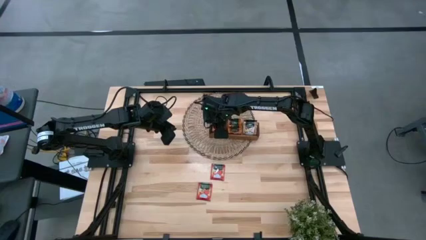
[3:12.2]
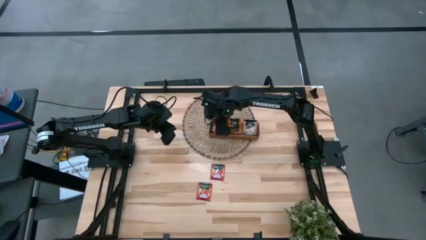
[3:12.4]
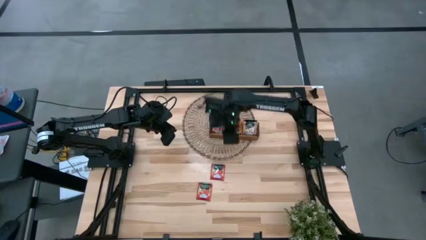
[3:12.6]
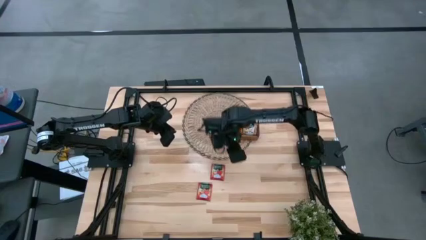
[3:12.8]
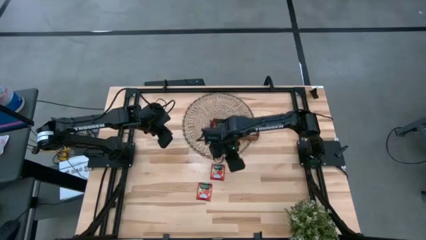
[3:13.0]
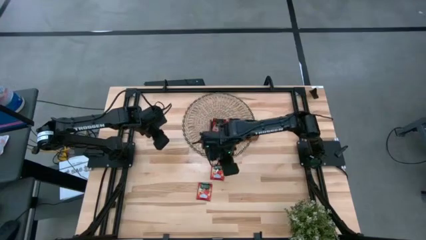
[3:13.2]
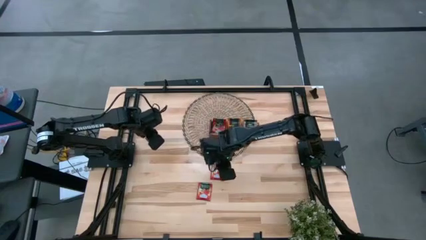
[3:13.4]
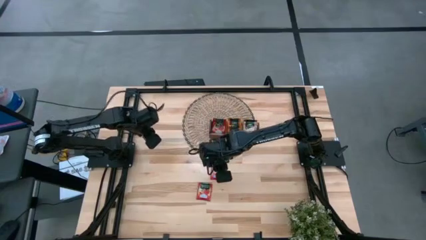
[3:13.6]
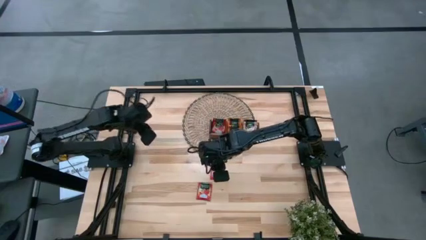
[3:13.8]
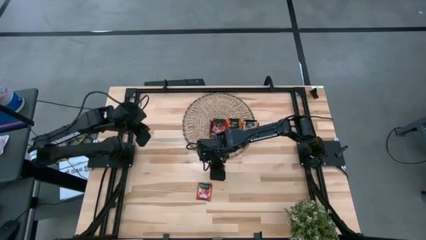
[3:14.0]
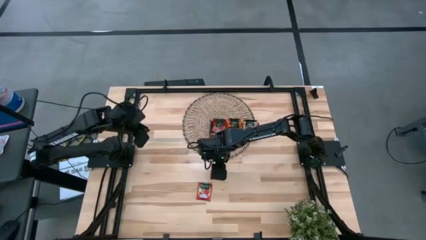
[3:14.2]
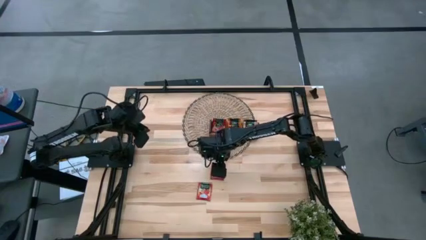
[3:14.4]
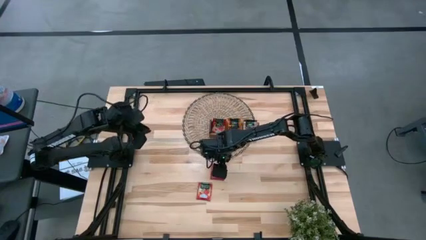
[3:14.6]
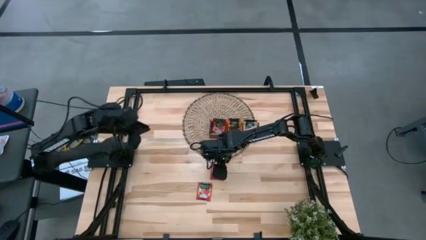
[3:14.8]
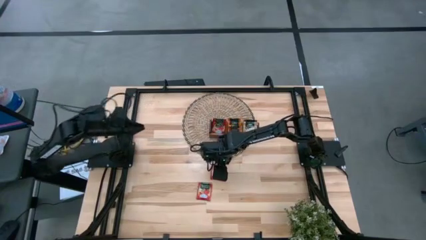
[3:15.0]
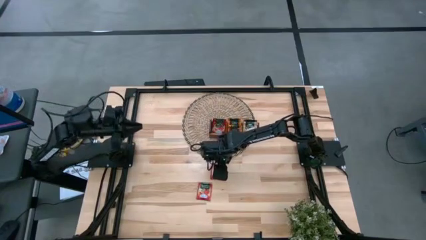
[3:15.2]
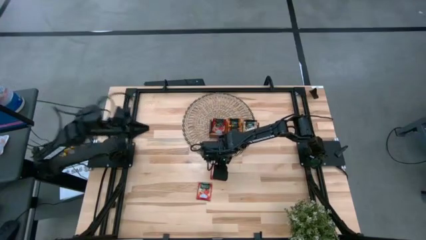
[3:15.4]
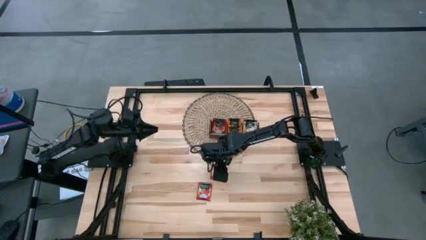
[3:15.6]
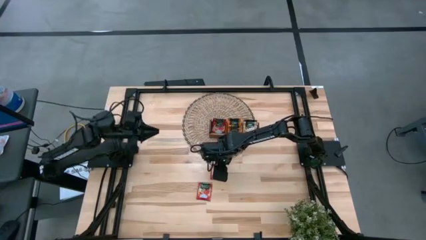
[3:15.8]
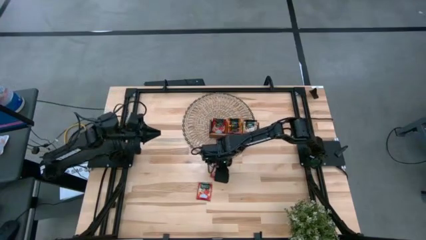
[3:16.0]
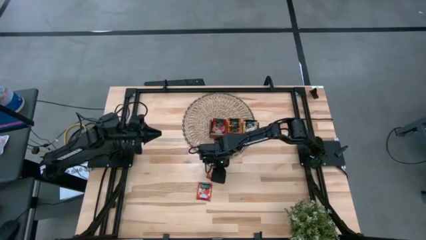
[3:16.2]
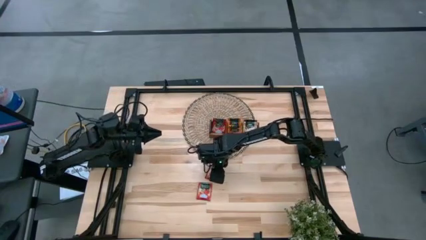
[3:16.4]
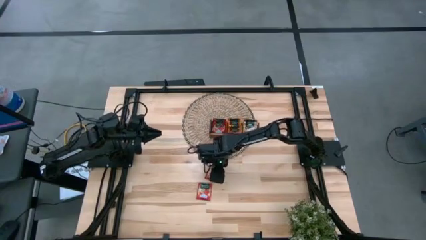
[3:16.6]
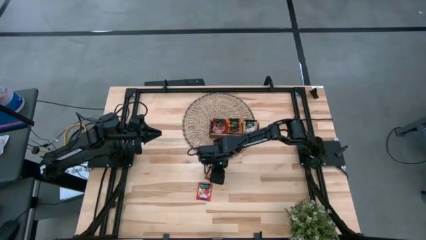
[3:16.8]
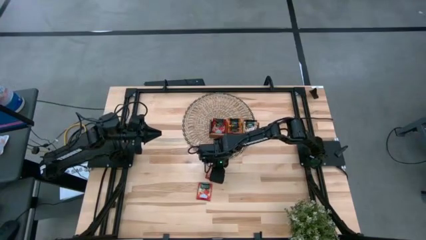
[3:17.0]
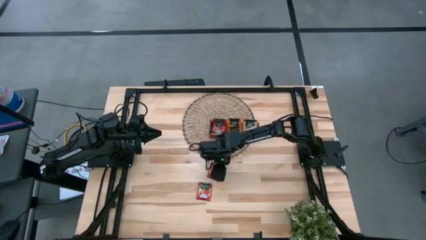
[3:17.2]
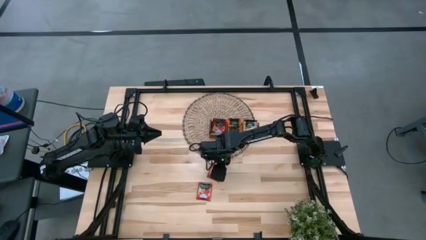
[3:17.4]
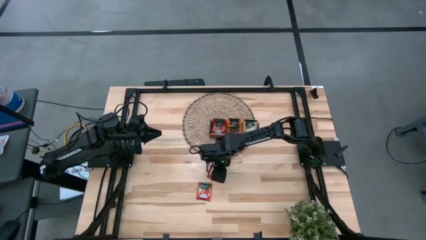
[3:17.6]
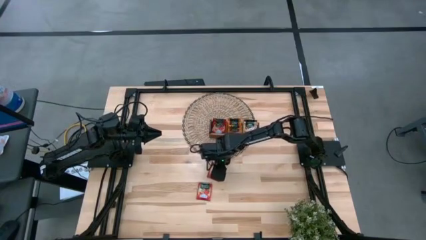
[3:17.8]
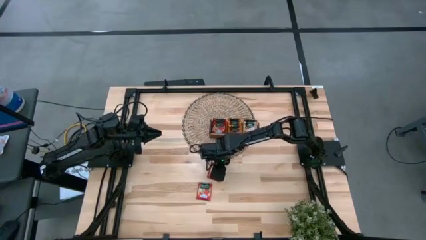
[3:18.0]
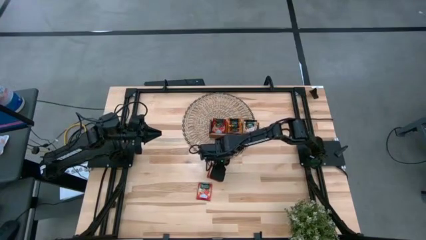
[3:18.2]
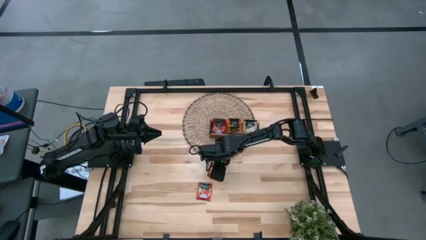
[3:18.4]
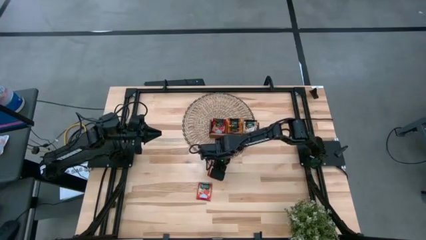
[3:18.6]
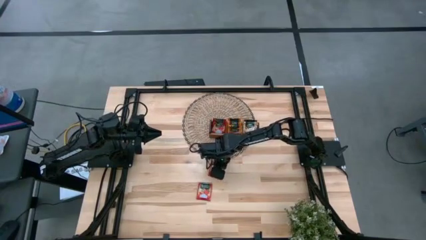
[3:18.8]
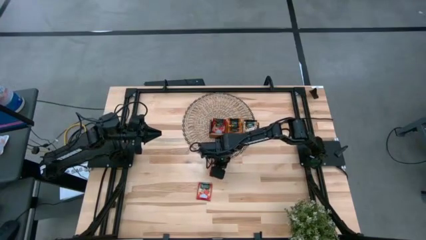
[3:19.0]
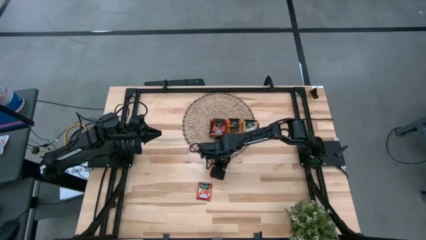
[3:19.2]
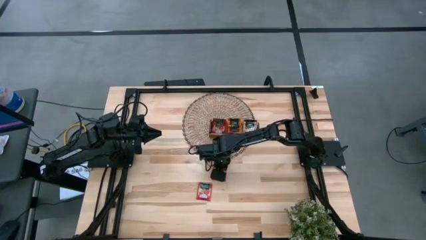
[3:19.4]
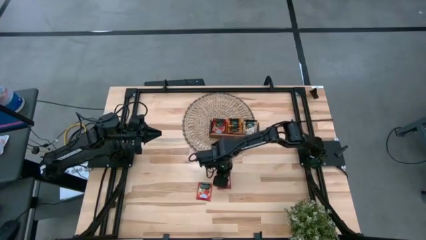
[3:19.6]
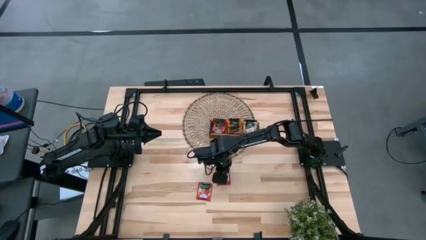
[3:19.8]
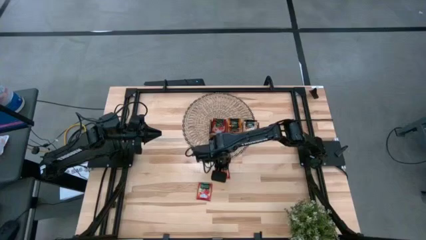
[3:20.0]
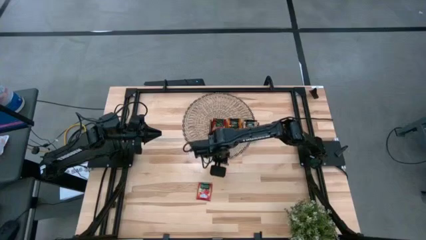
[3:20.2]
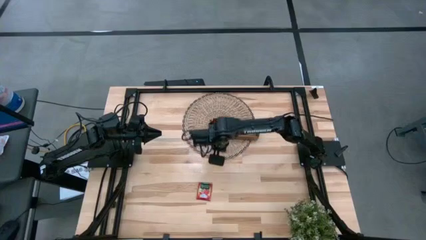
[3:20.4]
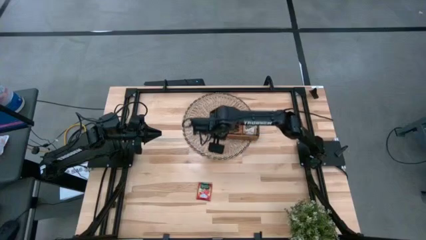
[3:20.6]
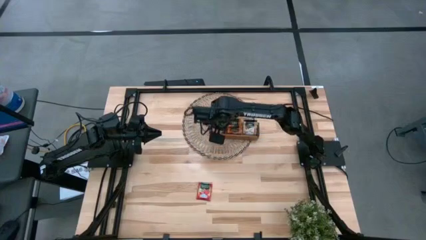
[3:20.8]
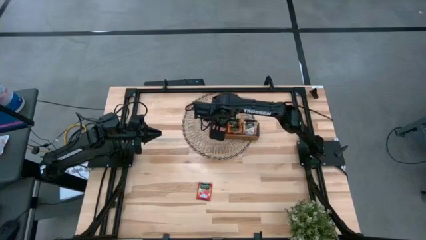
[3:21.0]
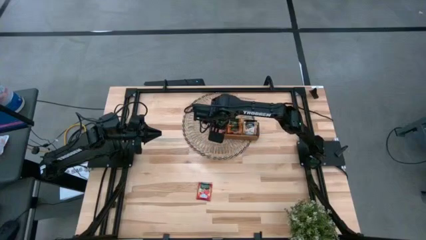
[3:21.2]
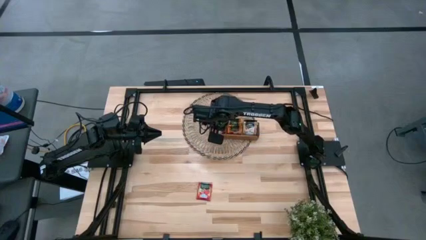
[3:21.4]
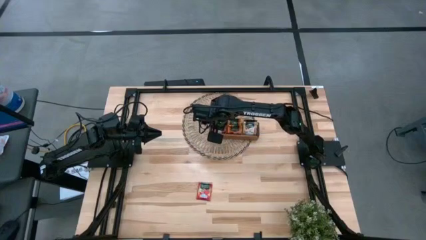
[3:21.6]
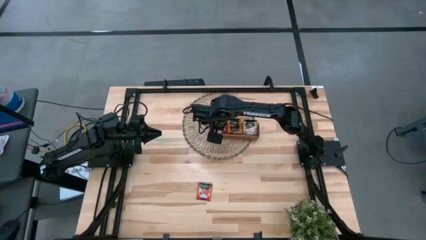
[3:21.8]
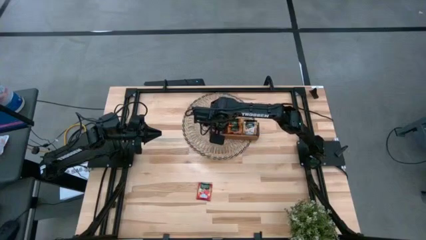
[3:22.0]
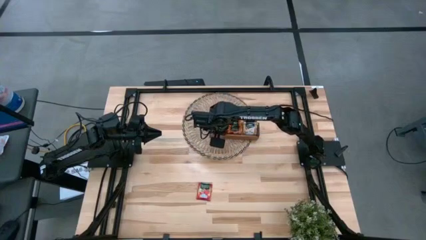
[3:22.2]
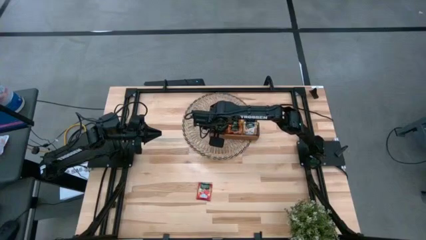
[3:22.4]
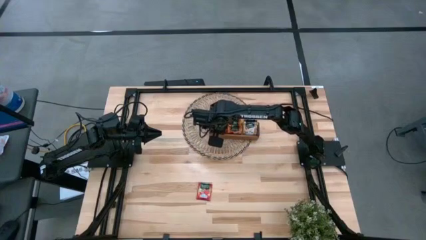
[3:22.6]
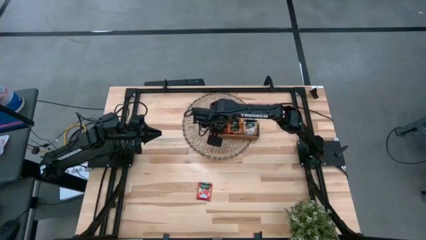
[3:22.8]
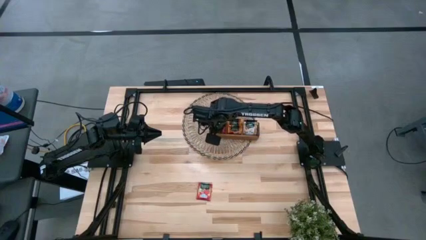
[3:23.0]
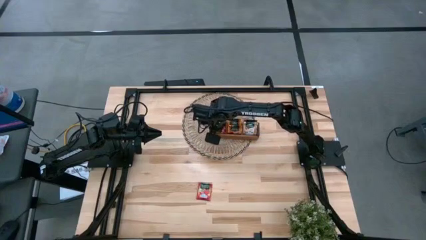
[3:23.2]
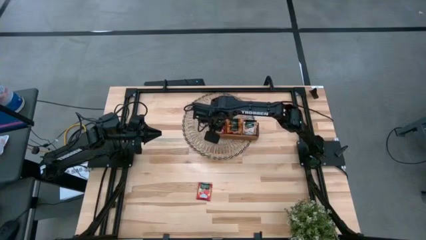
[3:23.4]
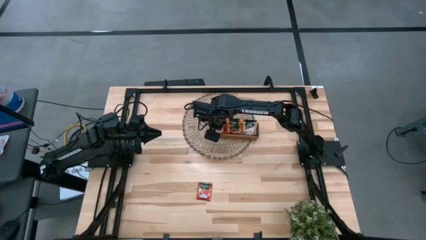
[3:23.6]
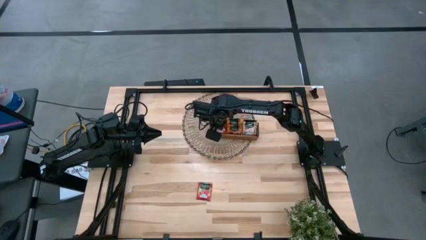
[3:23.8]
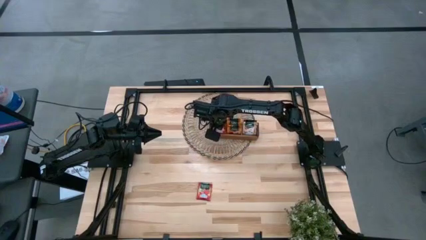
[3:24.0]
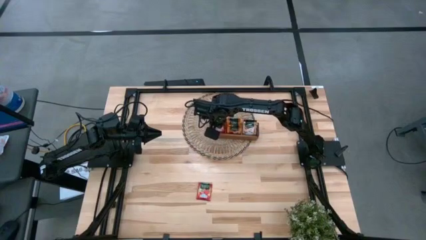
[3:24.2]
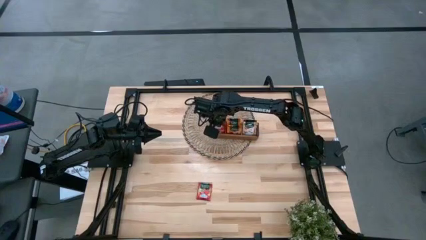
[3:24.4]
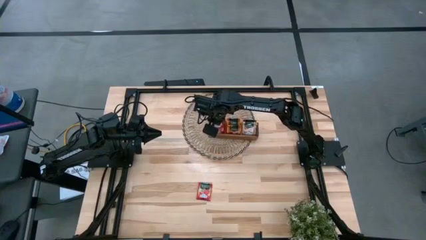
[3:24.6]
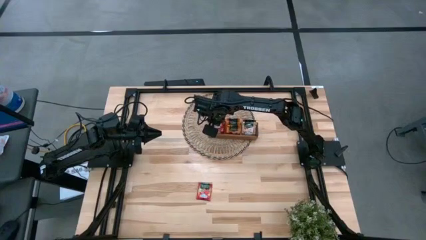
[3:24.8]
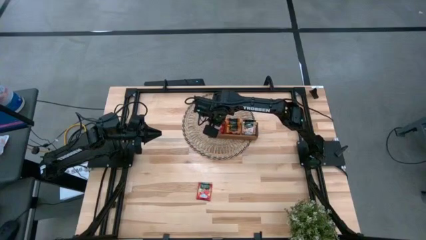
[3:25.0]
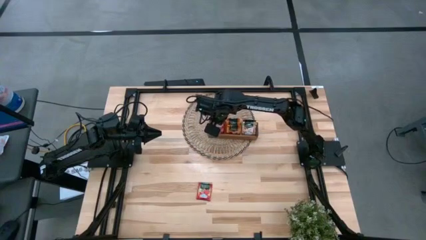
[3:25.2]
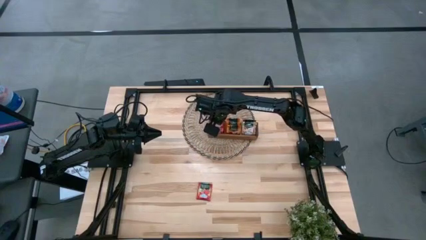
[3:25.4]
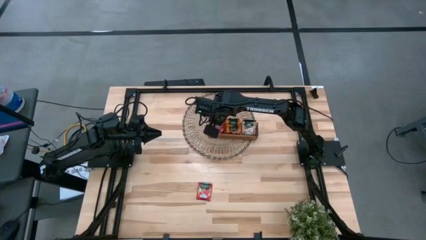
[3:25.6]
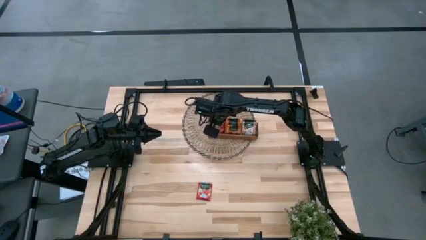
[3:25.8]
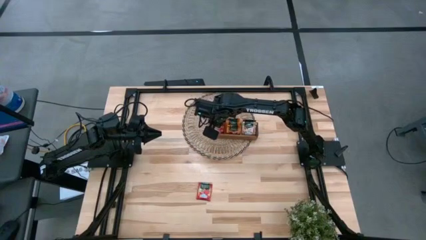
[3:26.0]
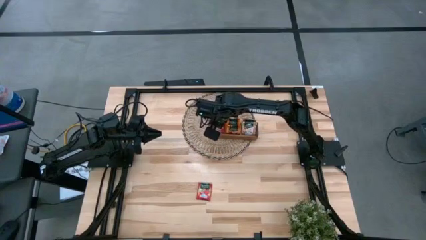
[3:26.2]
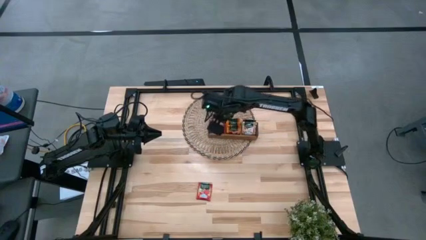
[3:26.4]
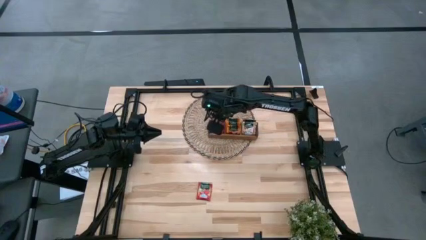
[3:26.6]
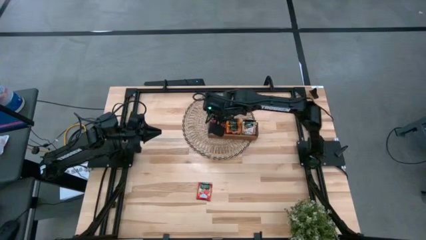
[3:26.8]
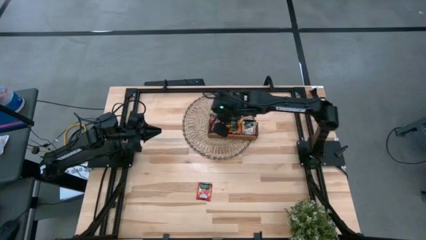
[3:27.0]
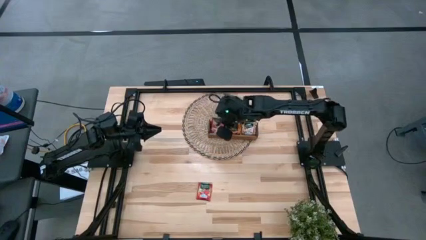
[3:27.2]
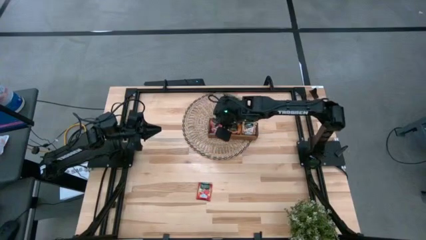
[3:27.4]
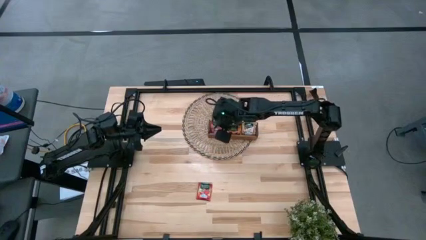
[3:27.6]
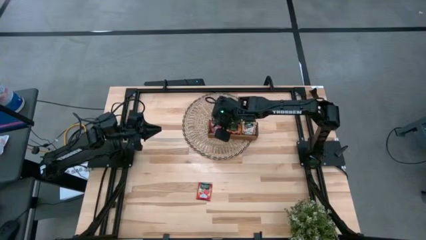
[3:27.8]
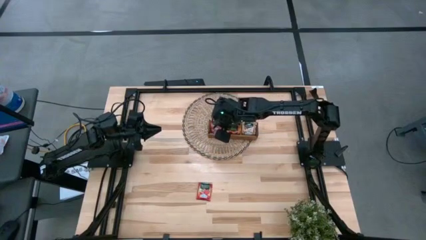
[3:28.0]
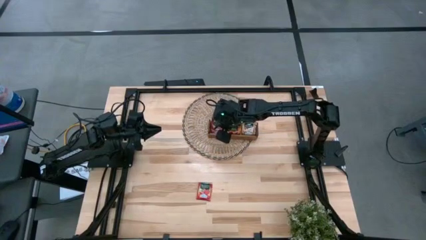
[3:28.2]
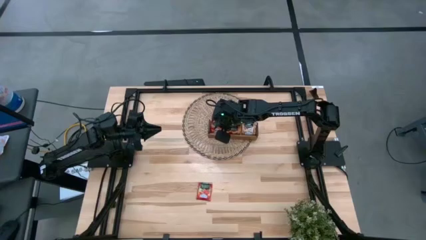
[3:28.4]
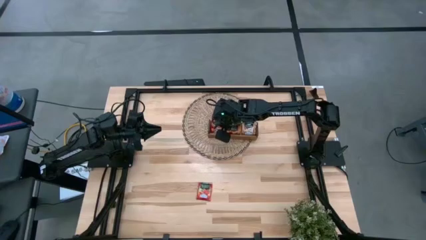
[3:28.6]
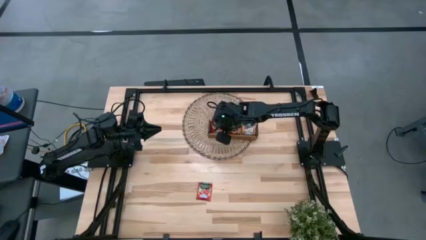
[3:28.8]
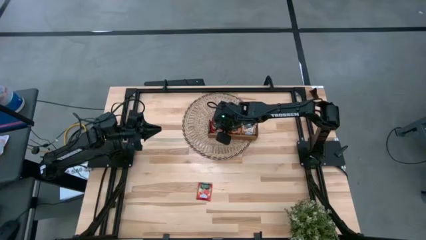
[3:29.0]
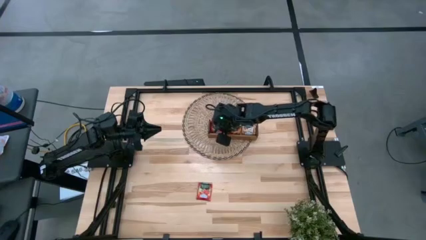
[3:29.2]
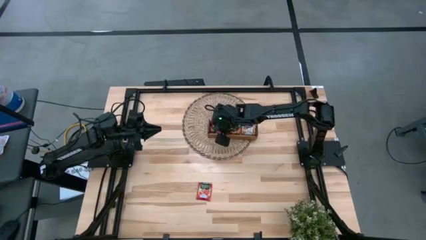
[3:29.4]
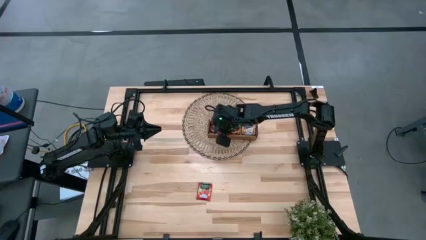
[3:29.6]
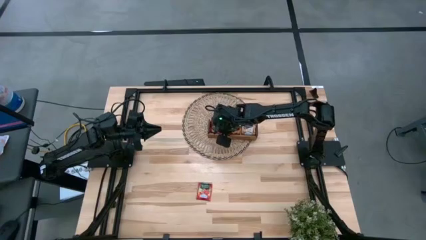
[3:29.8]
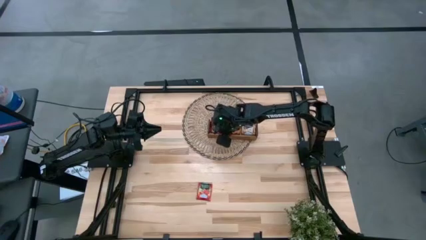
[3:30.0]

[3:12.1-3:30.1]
Task: Pick & Place Tea
Put the top red tea bag into the left slot of the wooden organizer
